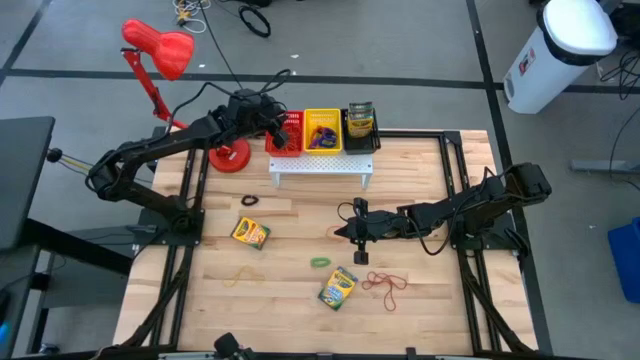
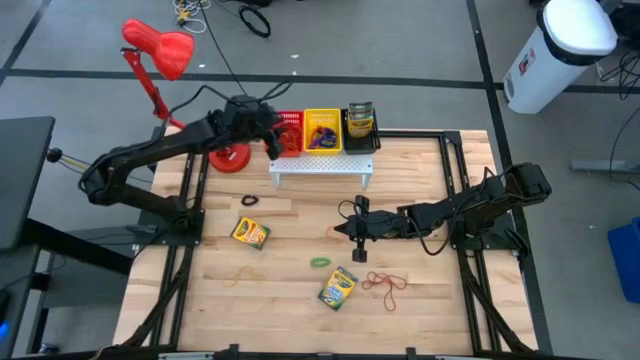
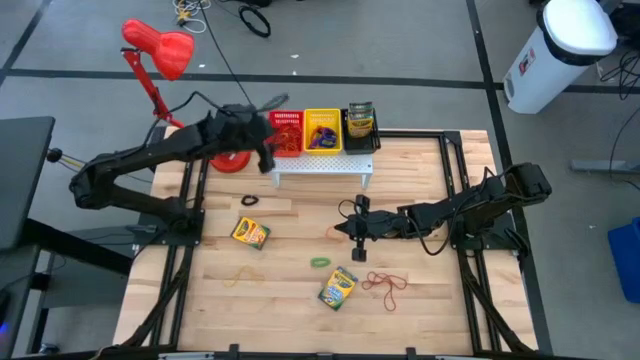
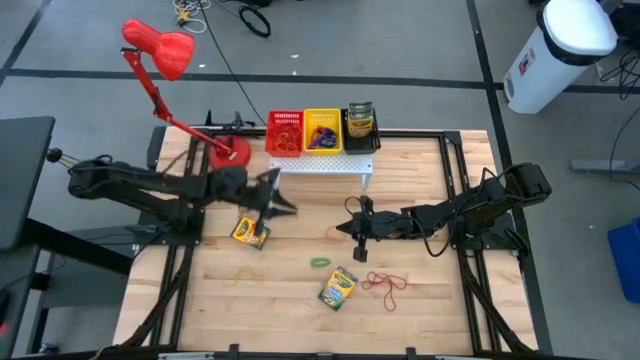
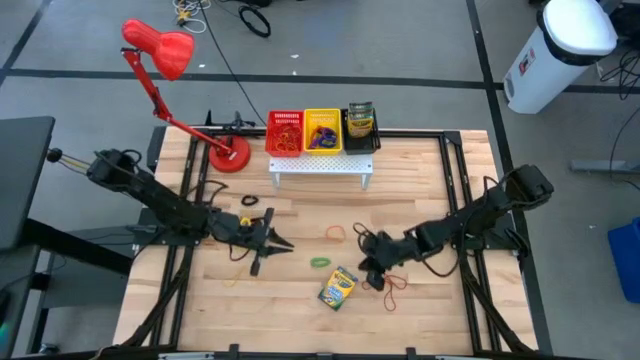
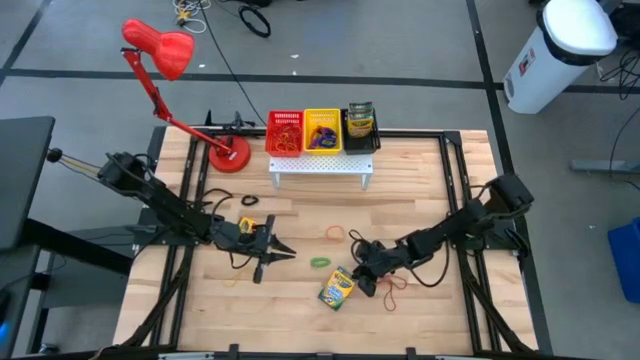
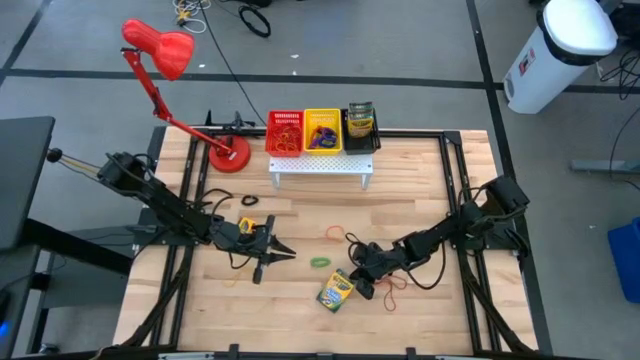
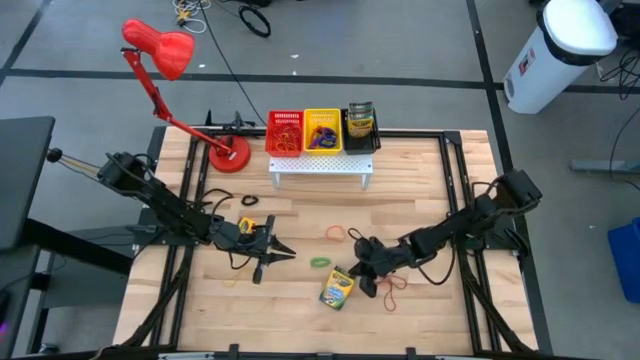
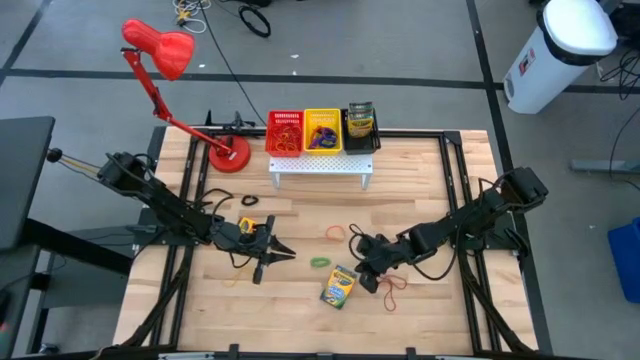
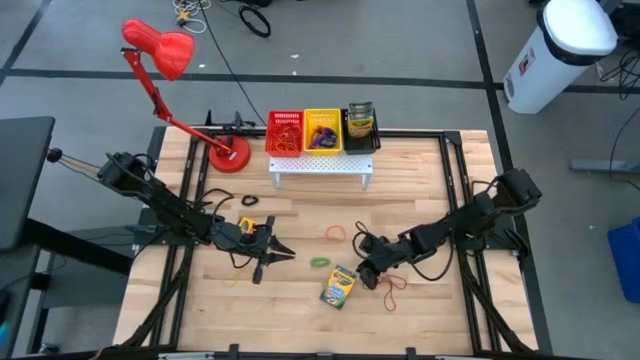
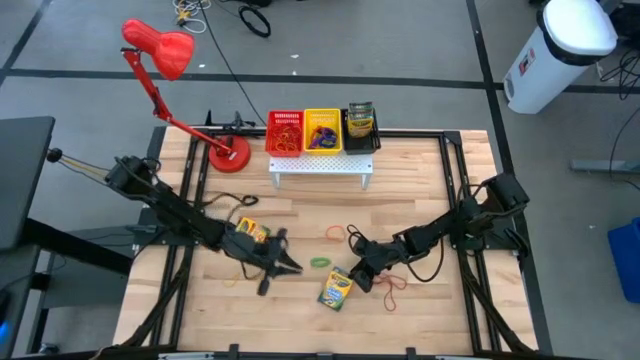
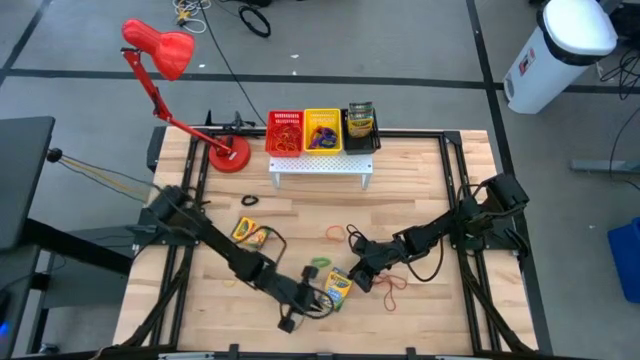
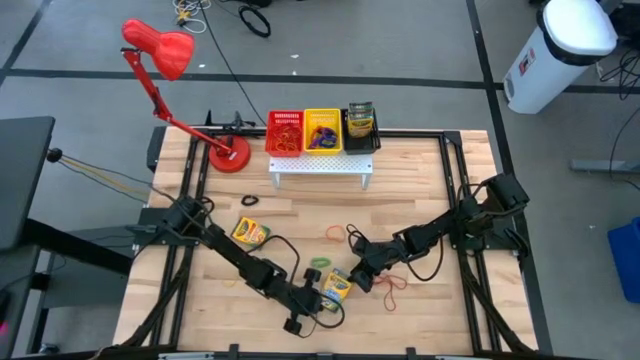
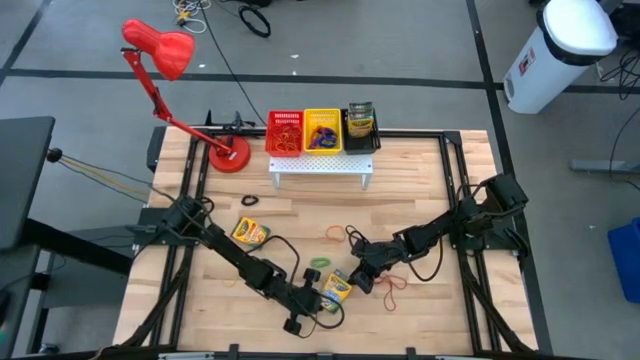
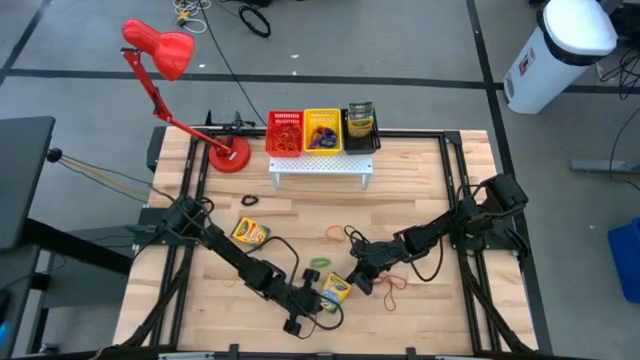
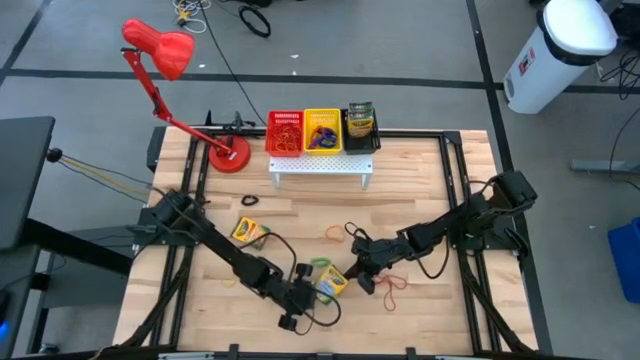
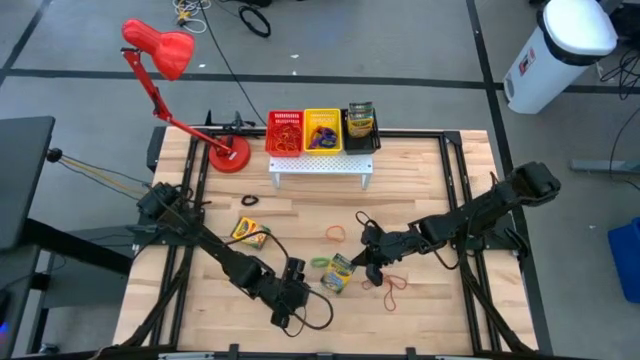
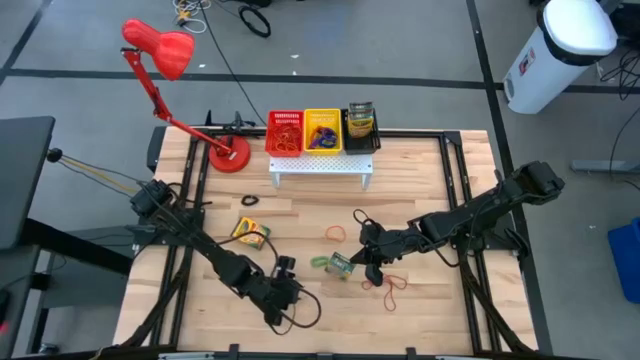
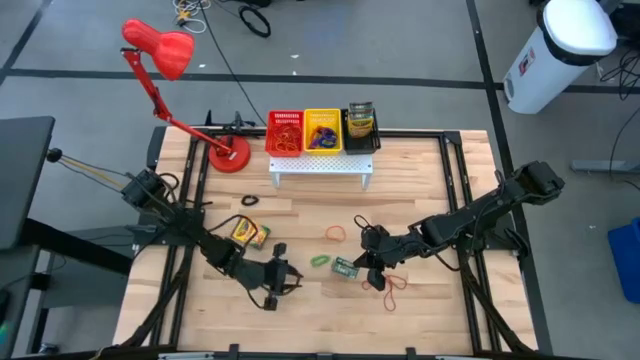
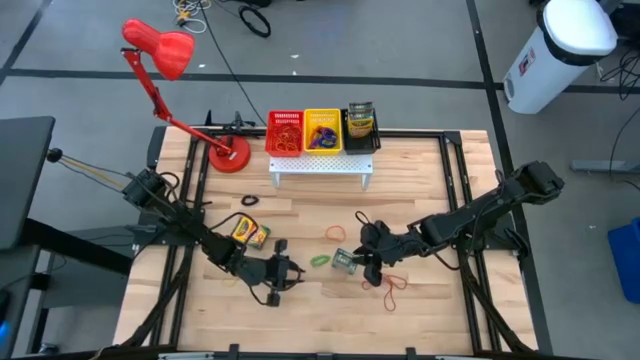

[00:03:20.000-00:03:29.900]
Task: Pick & Place Office Desk Supplies
Put the yellow crayon box into the black bin on the shelf

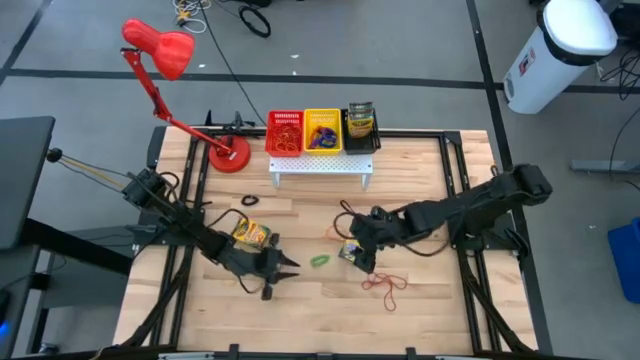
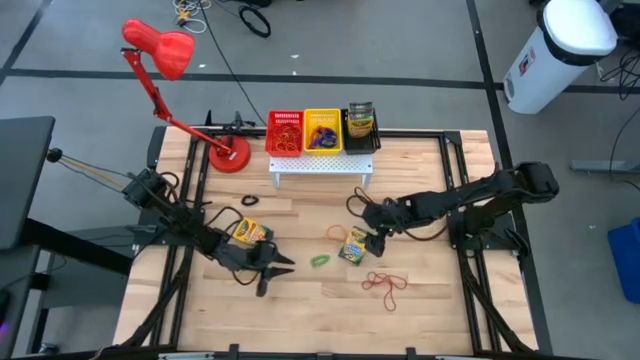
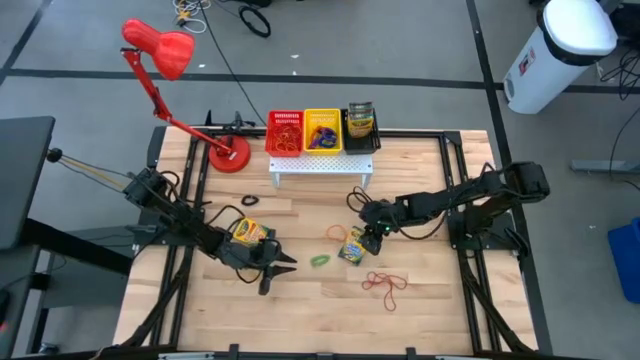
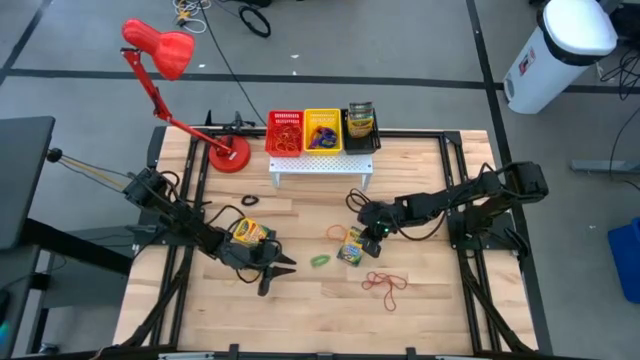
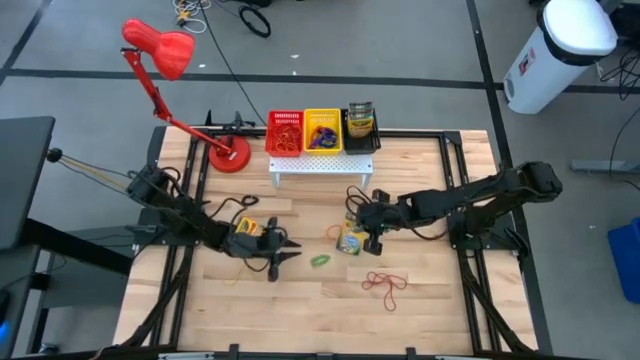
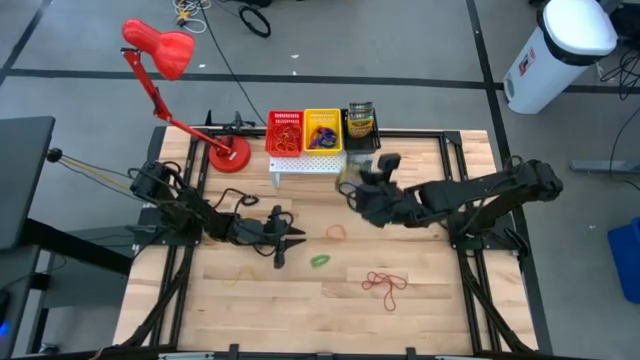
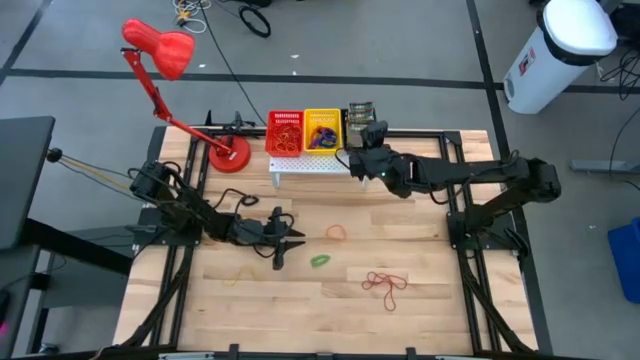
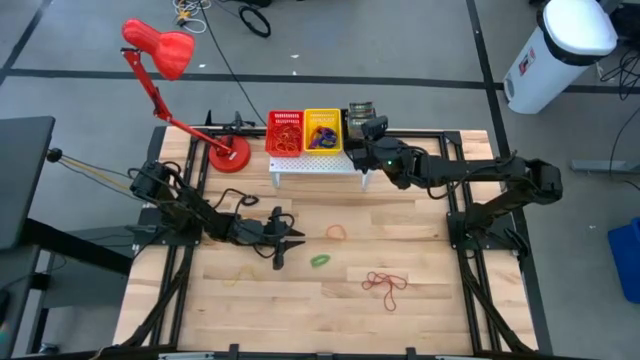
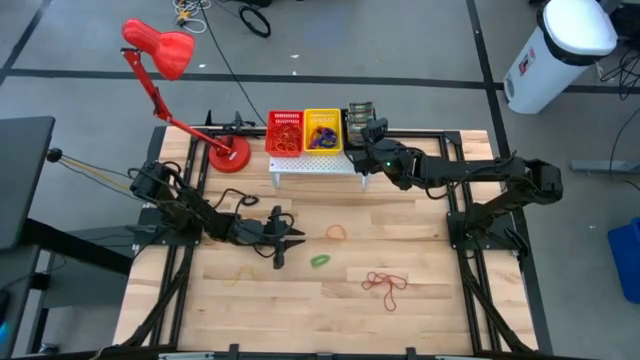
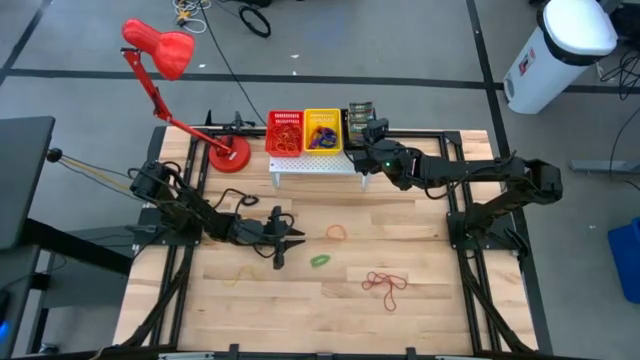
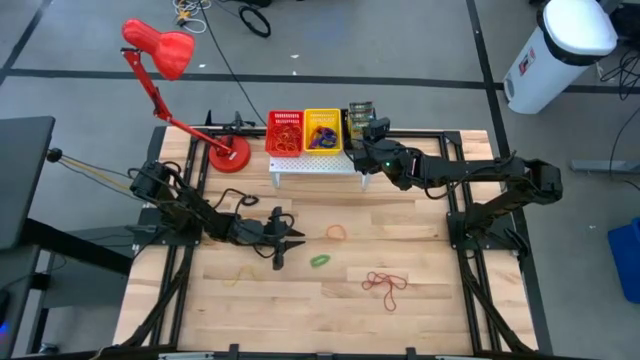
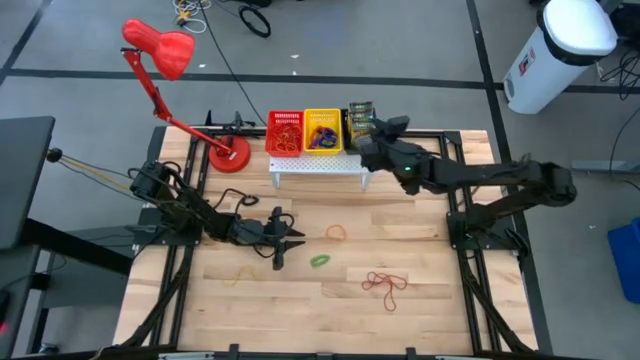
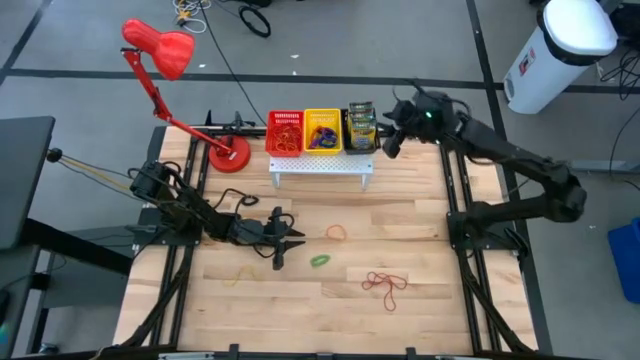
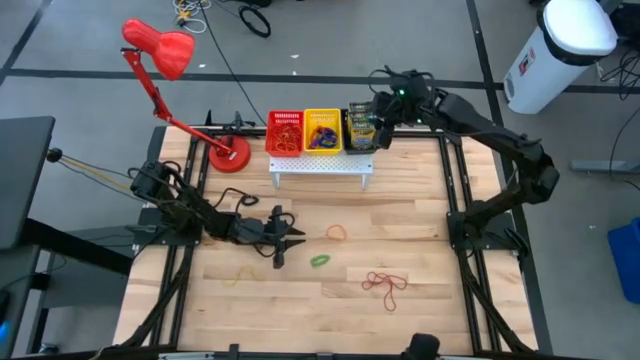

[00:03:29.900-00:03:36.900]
Put the yellow crayon box into the black bin on the shelf

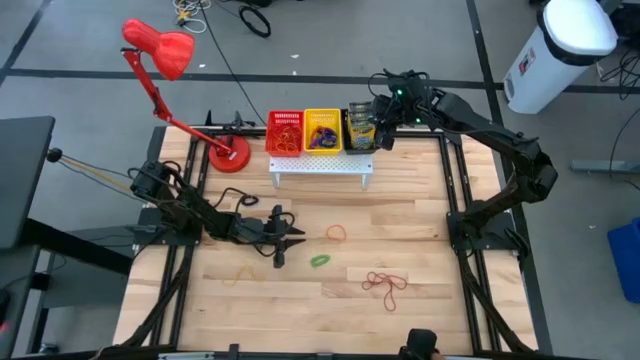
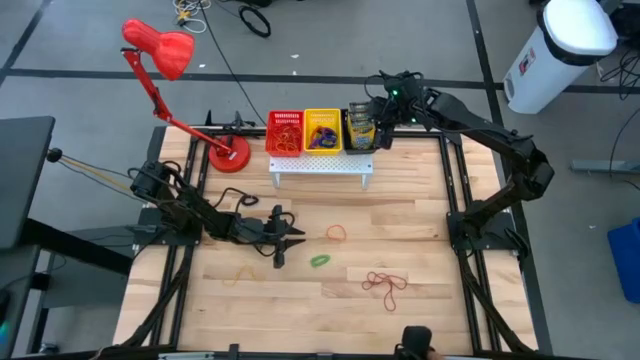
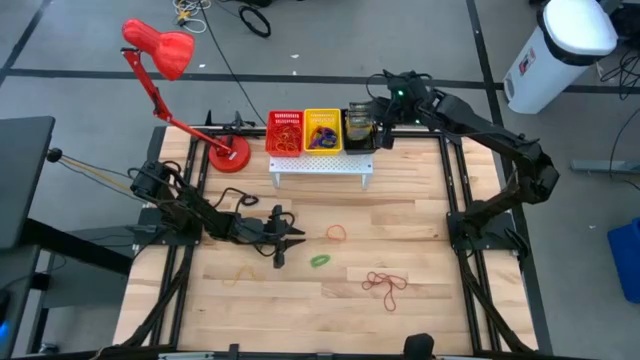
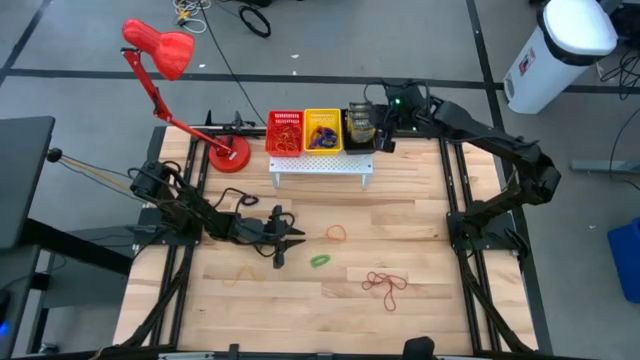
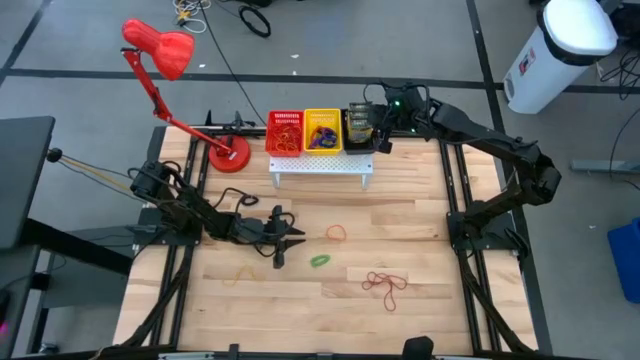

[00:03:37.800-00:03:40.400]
Put the yellow crayon box into the black bin on the shelf

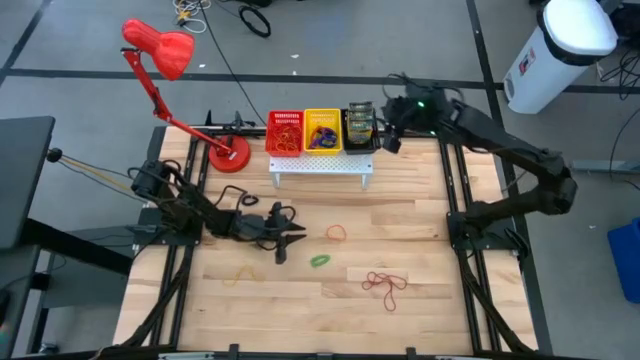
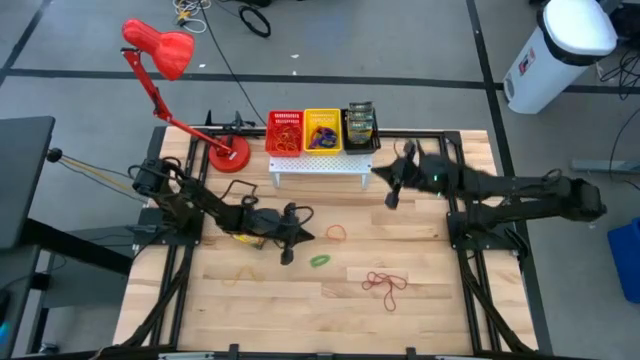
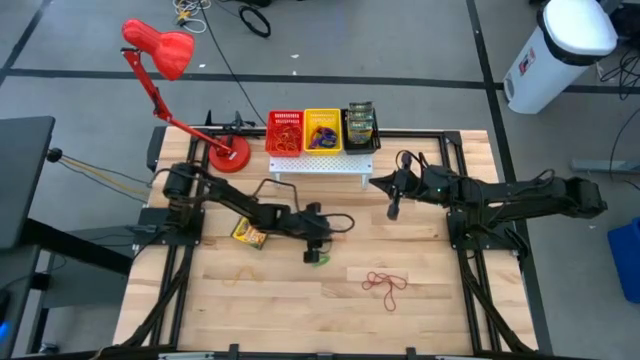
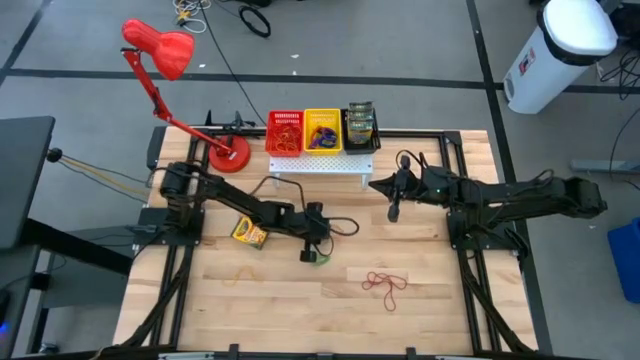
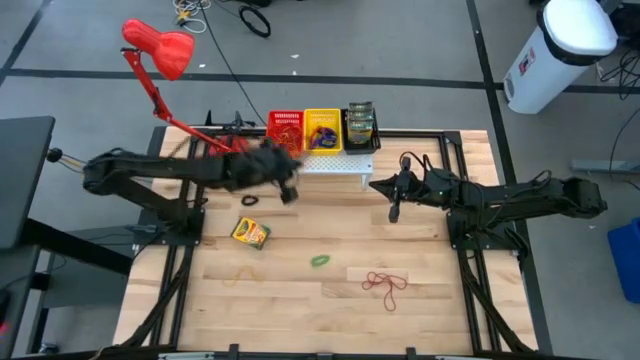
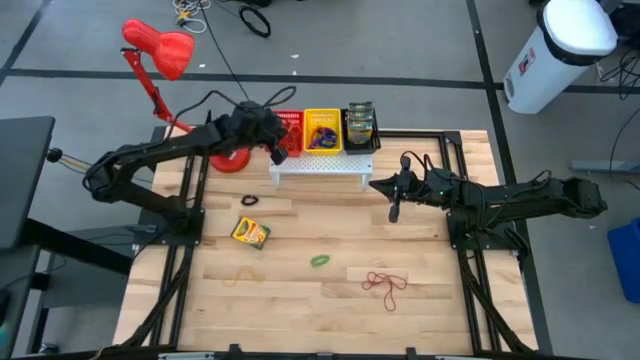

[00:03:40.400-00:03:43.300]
Put the orange rubber band into the red bin on the shelf
